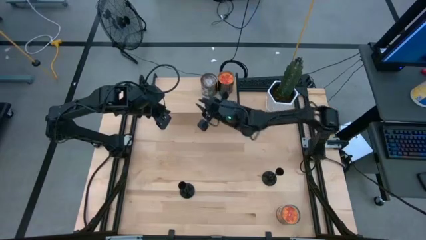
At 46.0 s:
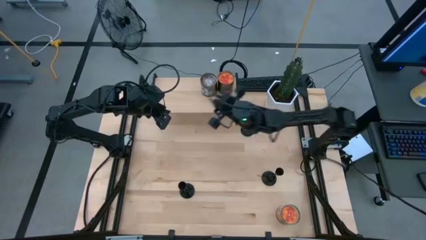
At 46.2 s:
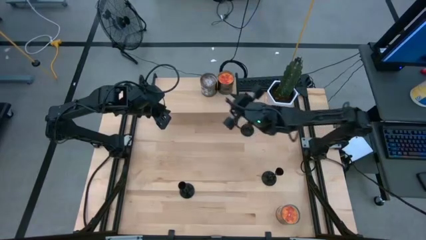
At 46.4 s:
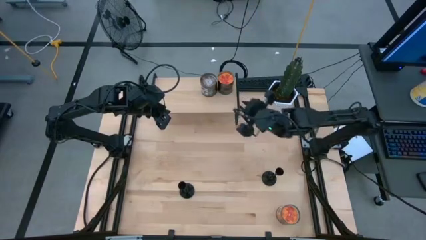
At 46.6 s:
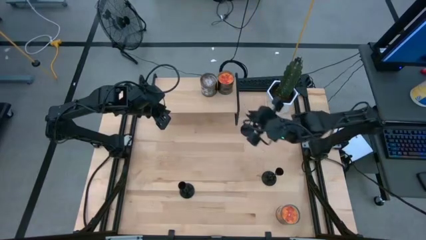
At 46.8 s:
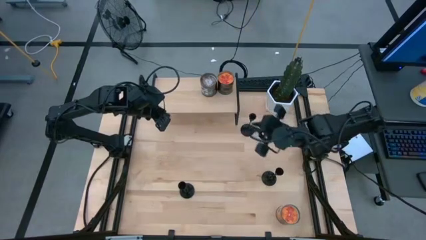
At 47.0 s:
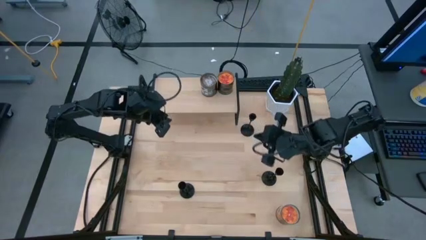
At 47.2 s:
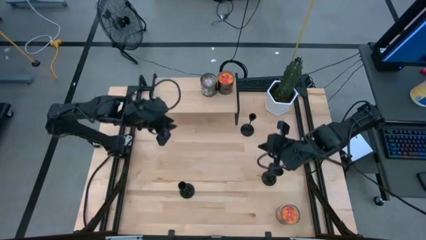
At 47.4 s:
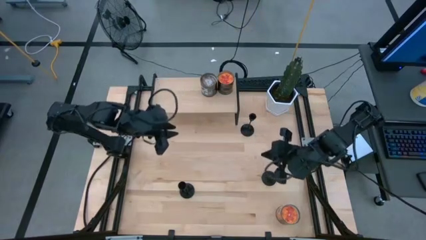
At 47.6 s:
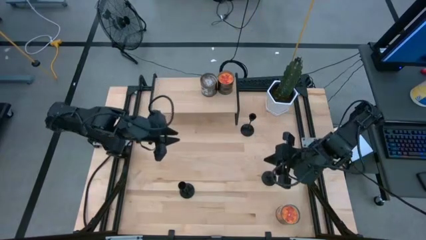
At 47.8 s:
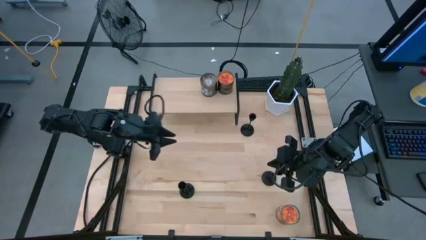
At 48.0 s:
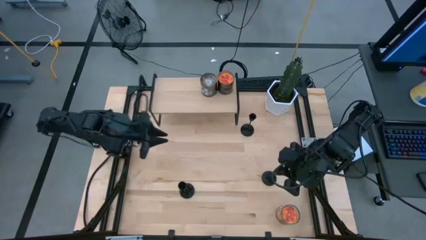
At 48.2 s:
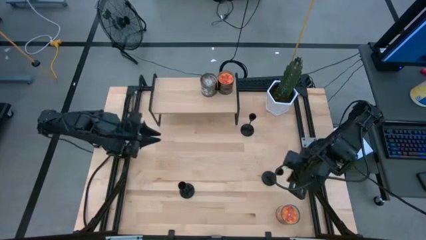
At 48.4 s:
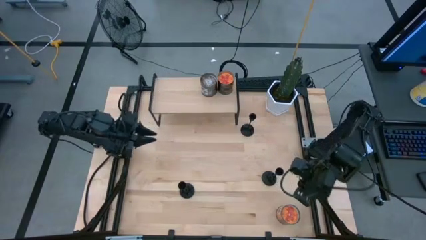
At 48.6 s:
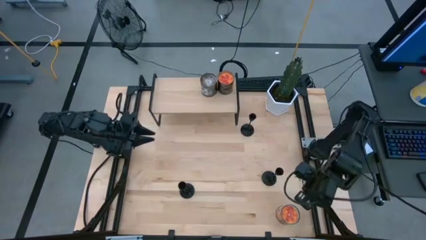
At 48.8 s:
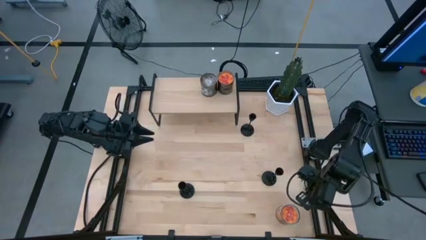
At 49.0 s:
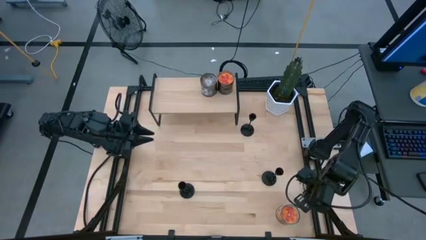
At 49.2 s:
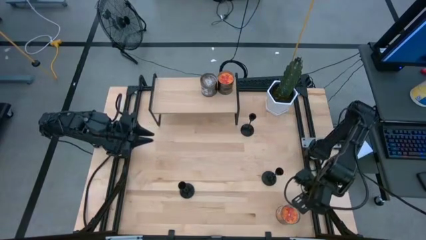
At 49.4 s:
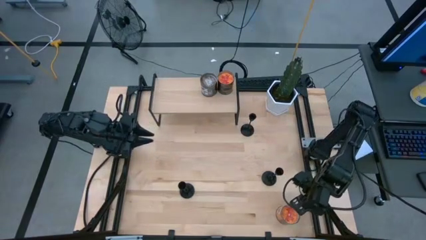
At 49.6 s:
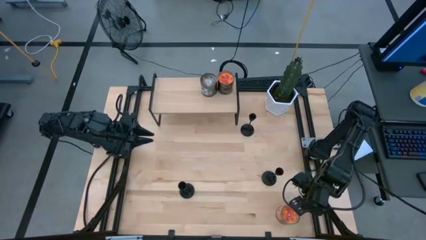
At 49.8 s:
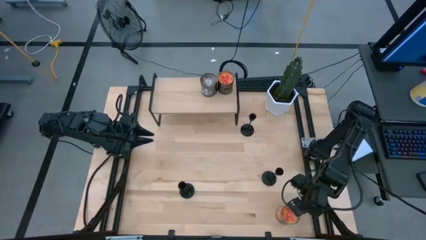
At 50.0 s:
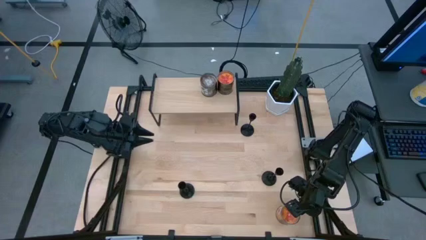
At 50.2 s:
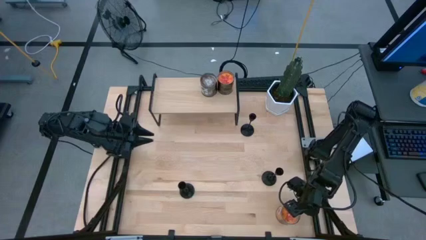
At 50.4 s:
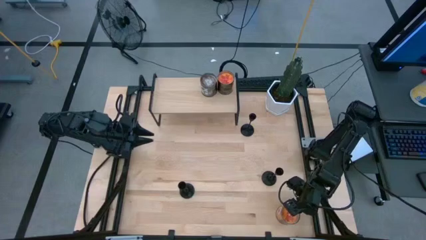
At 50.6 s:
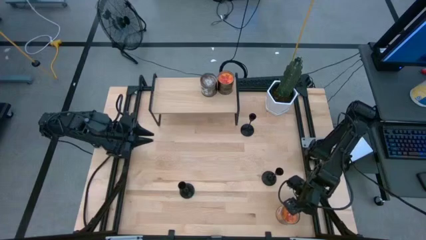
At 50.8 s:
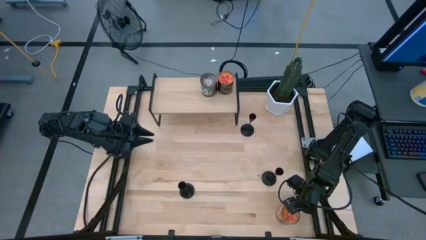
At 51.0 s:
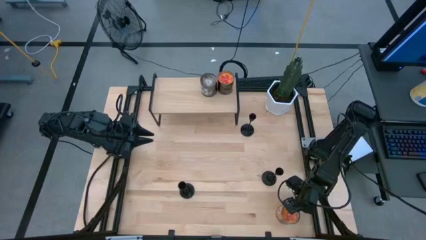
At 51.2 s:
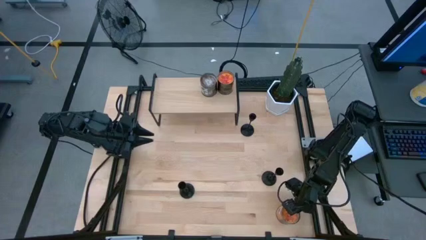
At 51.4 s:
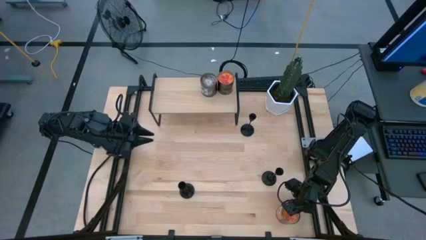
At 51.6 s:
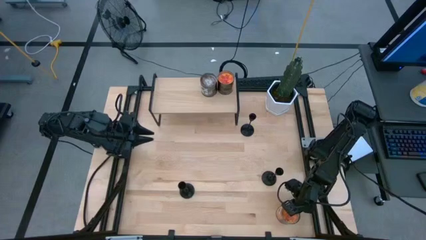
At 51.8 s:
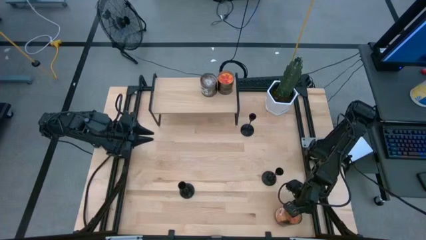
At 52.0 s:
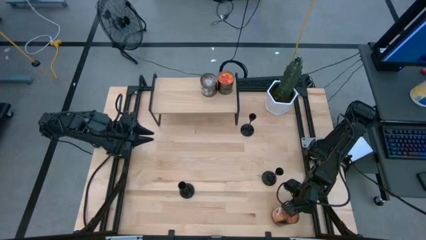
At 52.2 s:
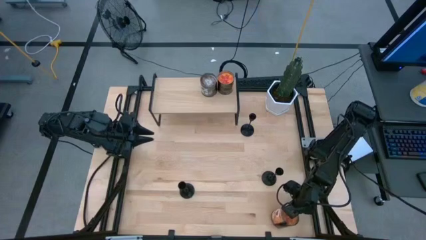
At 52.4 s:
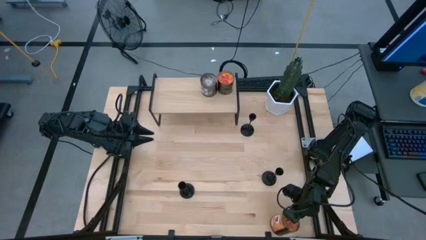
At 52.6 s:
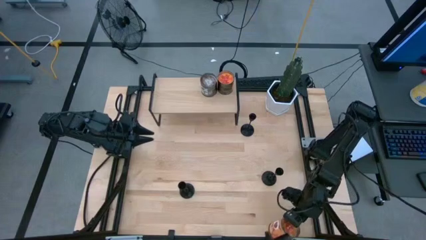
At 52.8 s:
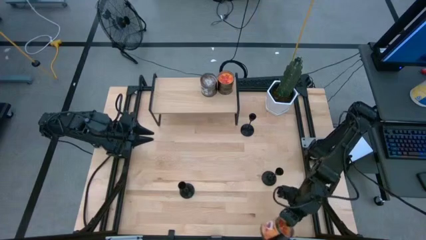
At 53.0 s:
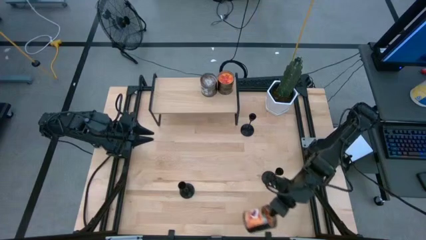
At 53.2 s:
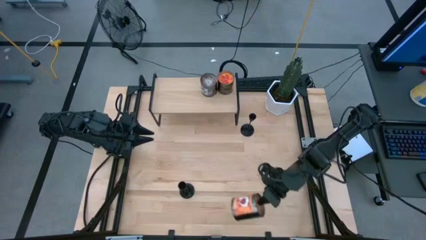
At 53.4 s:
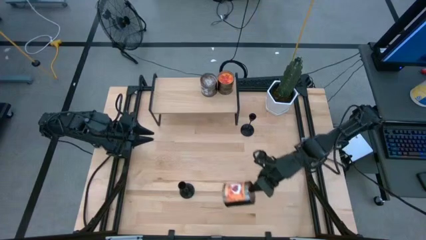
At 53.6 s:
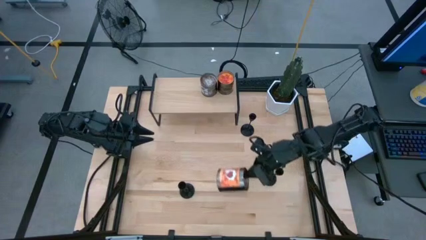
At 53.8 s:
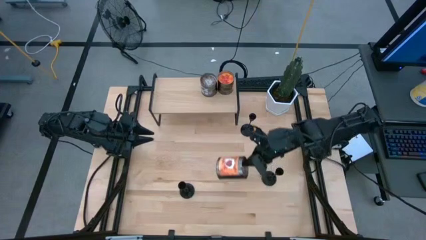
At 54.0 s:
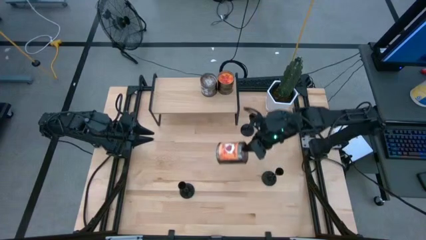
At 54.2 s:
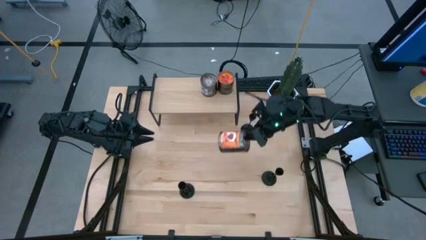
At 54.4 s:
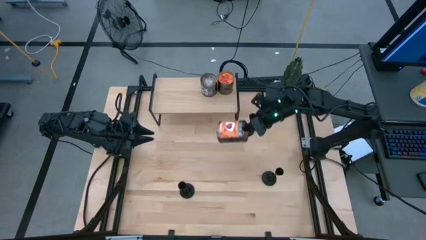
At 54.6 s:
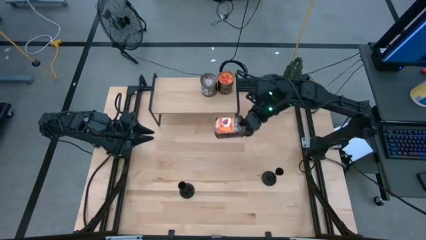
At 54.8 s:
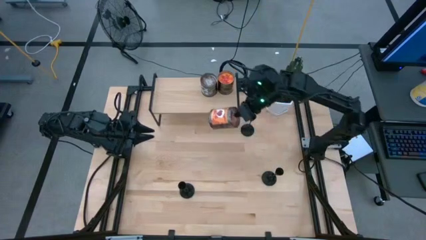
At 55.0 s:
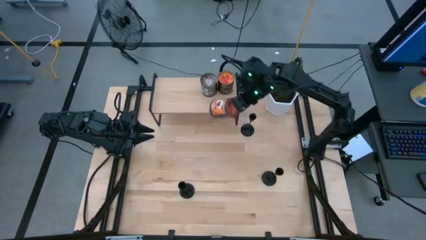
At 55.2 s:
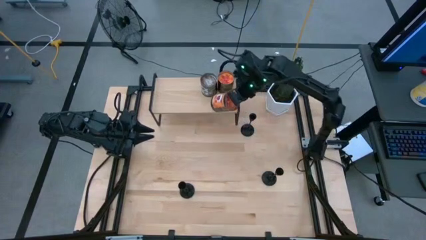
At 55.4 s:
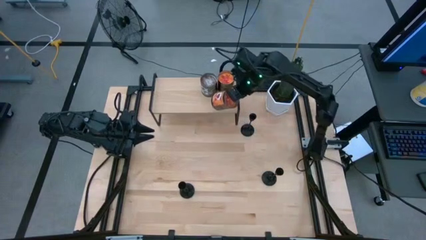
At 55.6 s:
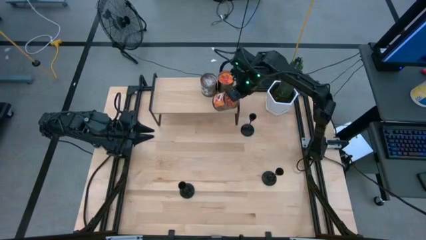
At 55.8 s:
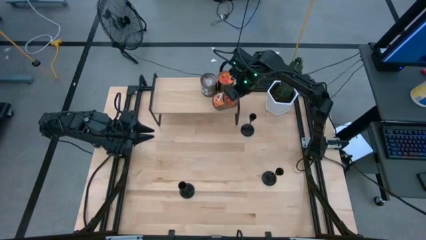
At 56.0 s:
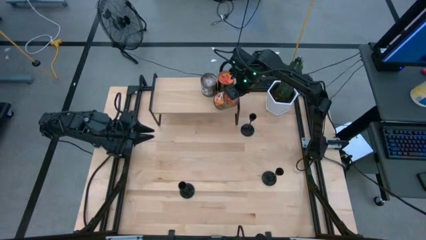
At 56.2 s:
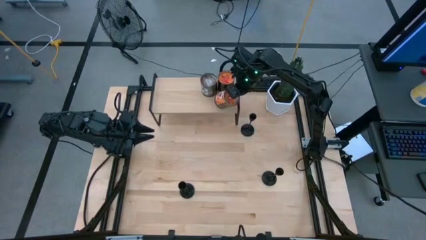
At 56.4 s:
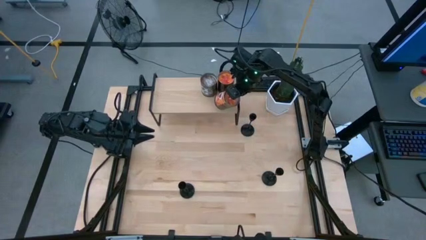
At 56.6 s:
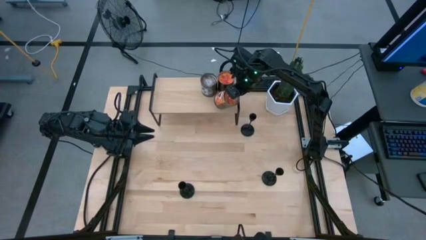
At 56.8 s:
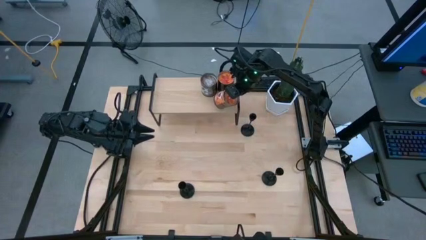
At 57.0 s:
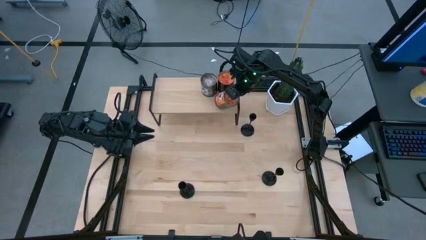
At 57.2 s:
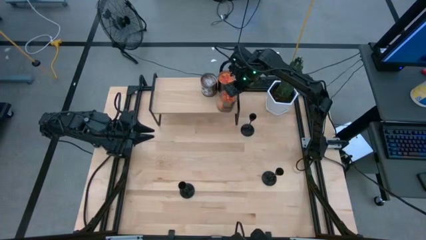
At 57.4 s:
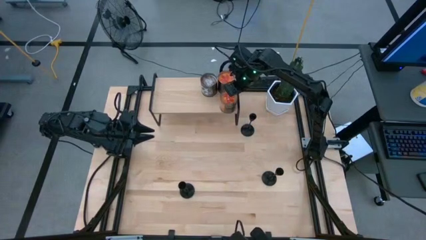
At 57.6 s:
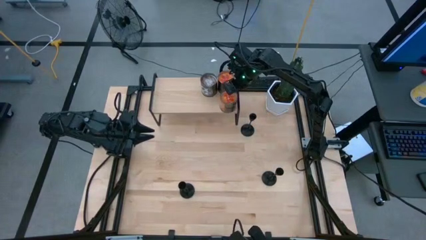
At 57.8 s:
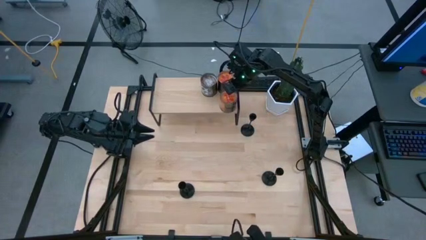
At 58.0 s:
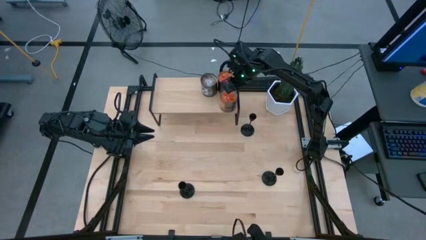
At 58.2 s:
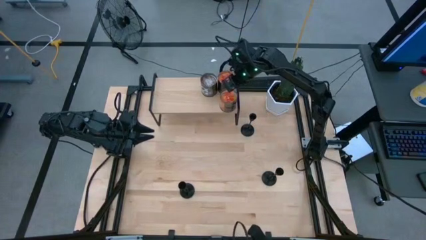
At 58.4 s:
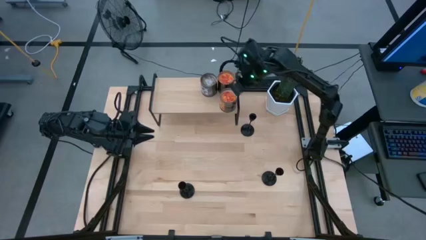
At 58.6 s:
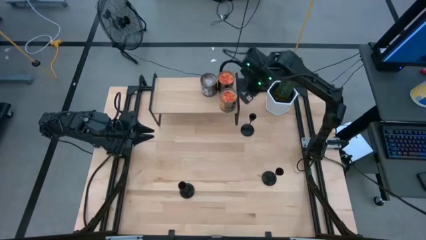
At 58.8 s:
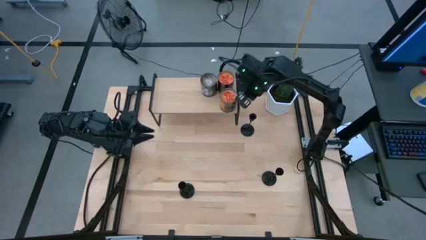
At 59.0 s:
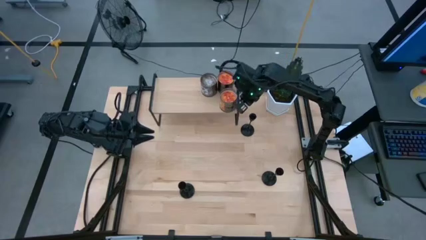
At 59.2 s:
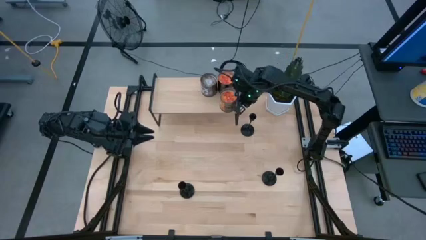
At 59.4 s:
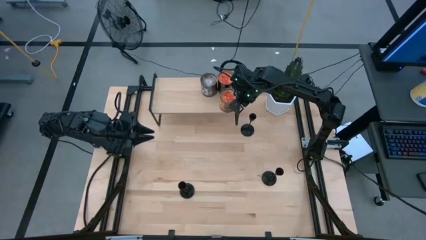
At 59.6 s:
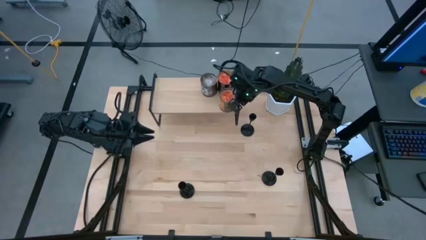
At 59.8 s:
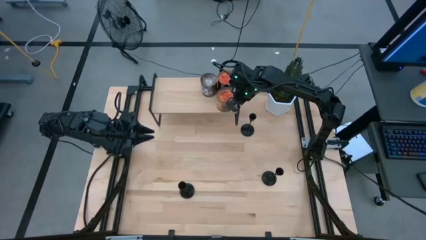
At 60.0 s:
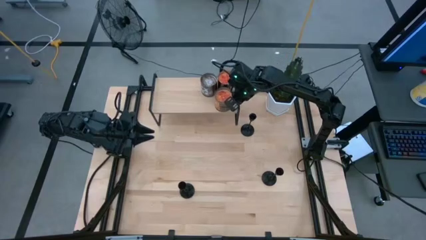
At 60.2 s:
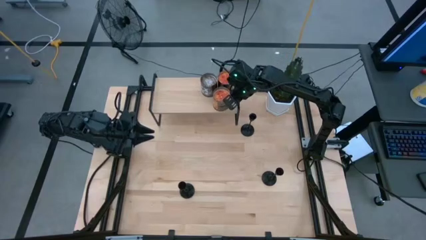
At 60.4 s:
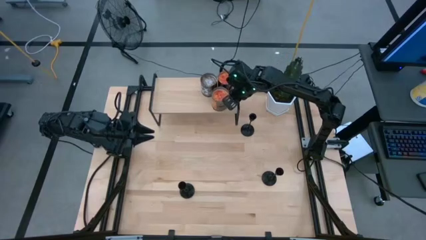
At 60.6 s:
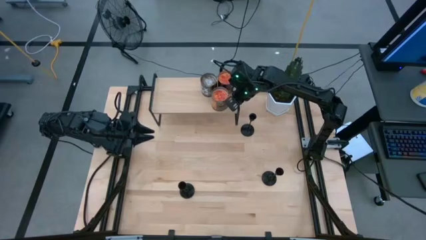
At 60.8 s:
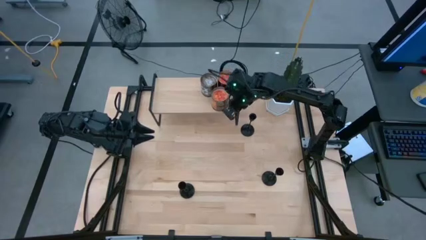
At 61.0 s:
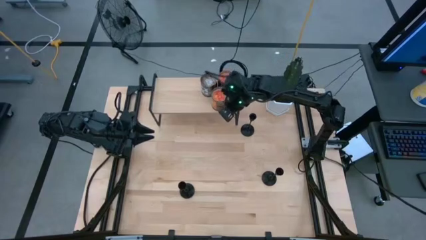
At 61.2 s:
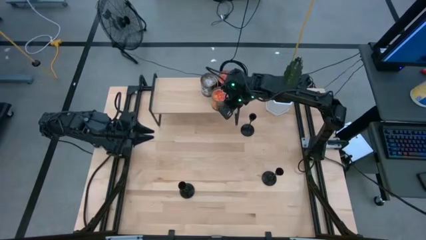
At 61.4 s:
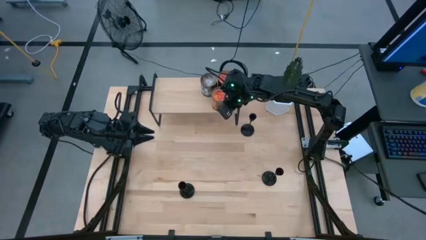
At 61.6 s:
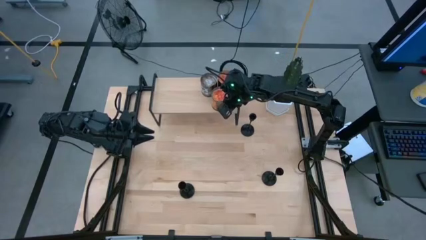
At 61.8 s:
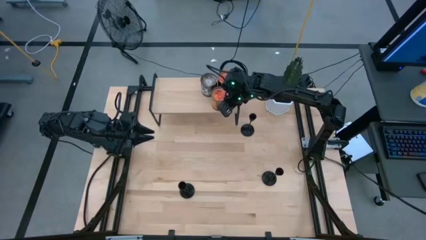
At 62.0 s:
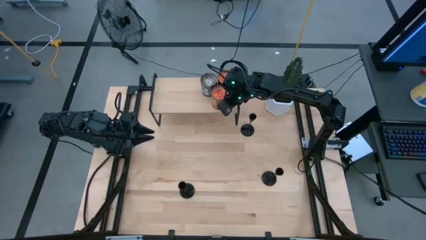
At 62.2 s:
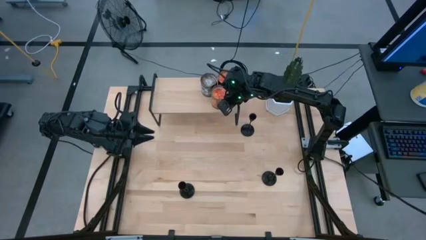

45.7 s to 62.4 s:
Task: Pick & Place candle stick holders
Put the silver scented candle on the shelf
